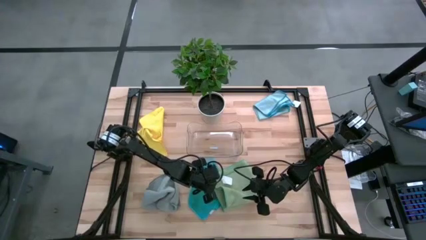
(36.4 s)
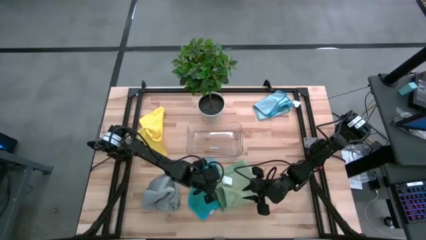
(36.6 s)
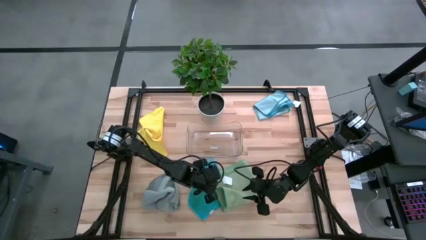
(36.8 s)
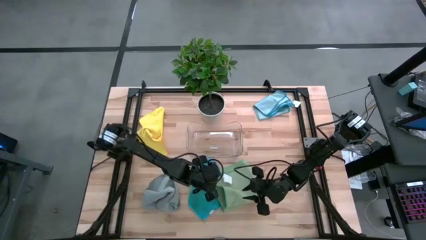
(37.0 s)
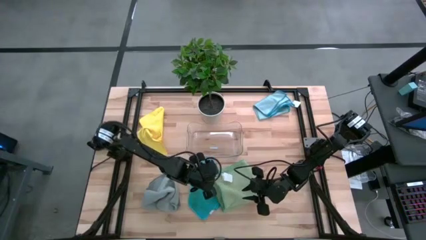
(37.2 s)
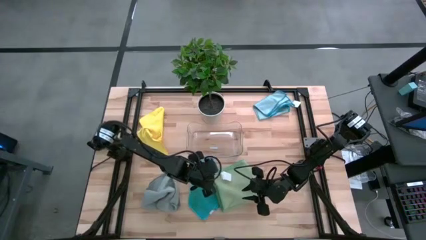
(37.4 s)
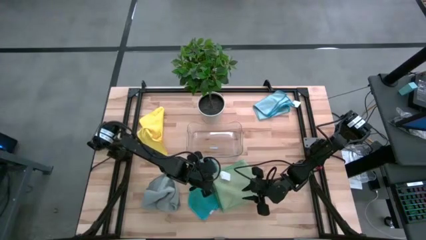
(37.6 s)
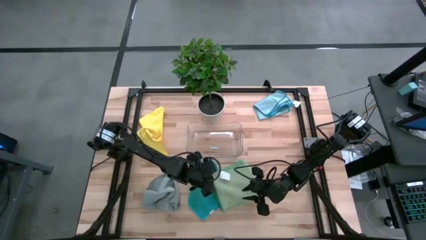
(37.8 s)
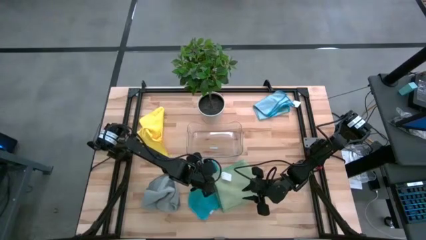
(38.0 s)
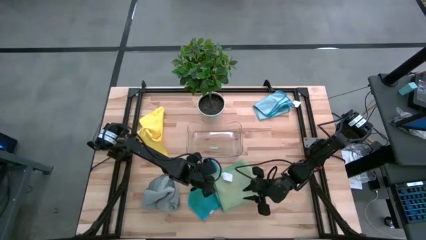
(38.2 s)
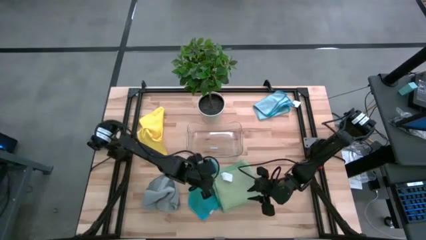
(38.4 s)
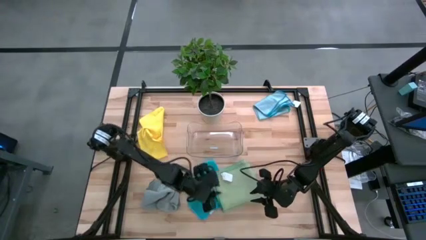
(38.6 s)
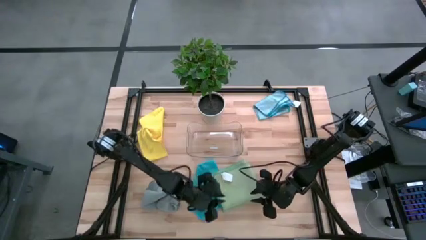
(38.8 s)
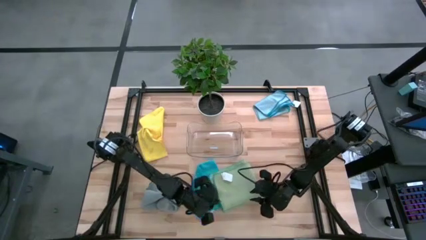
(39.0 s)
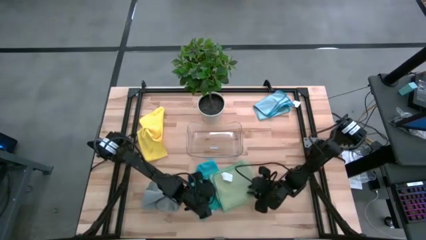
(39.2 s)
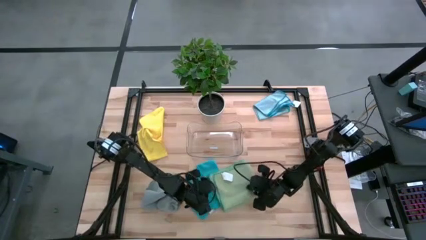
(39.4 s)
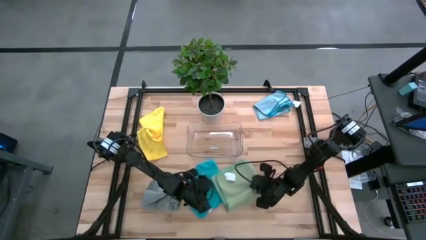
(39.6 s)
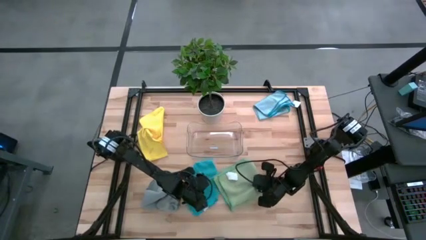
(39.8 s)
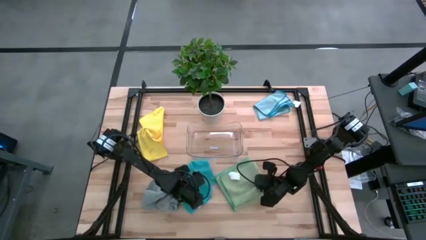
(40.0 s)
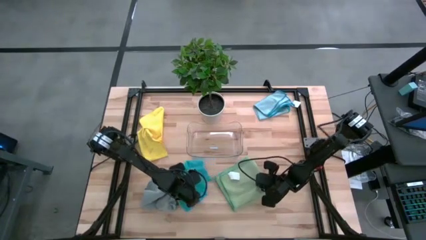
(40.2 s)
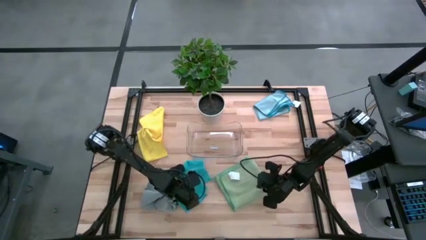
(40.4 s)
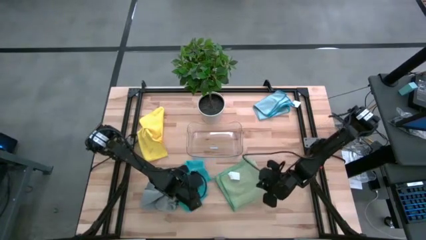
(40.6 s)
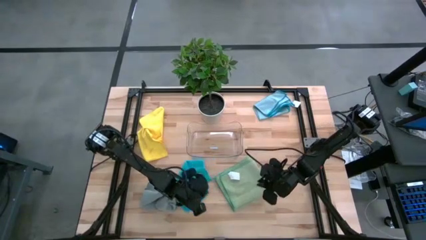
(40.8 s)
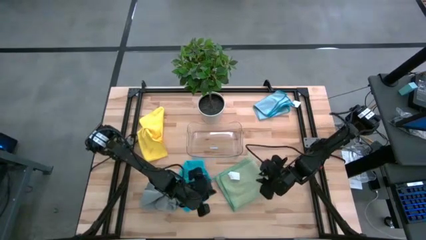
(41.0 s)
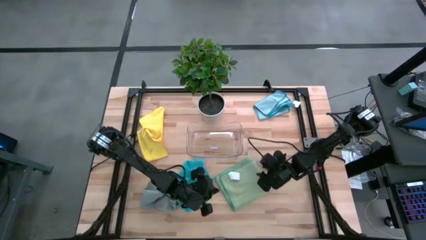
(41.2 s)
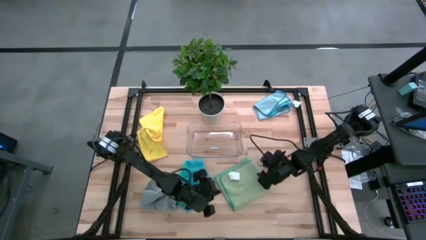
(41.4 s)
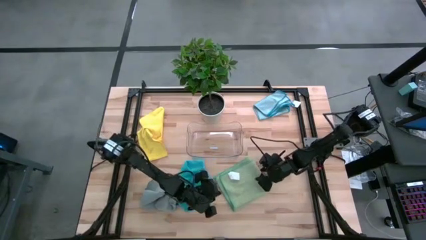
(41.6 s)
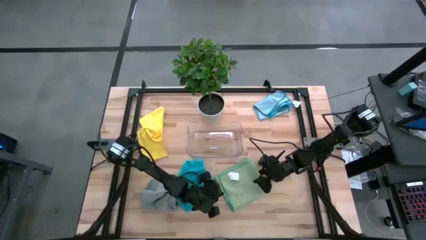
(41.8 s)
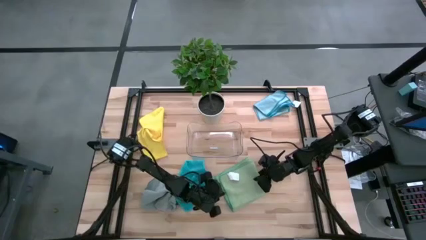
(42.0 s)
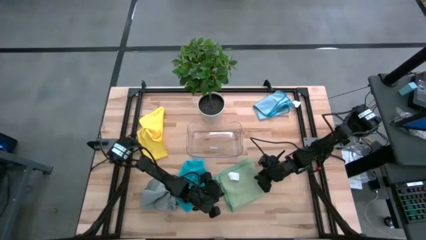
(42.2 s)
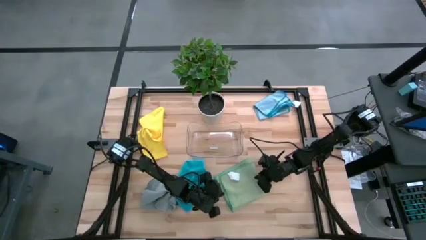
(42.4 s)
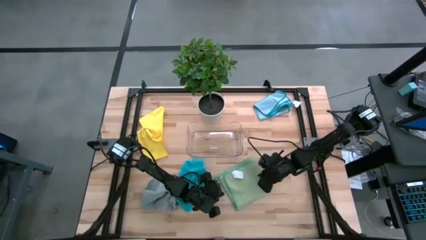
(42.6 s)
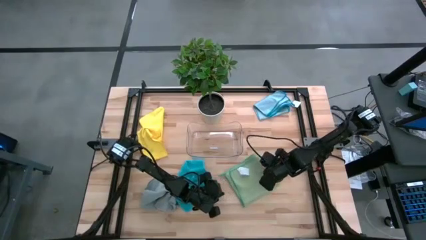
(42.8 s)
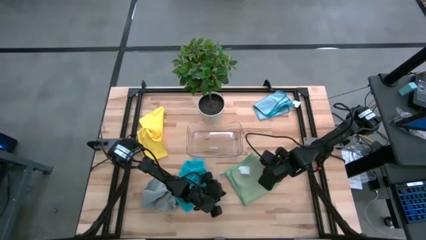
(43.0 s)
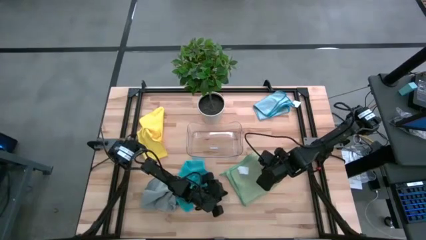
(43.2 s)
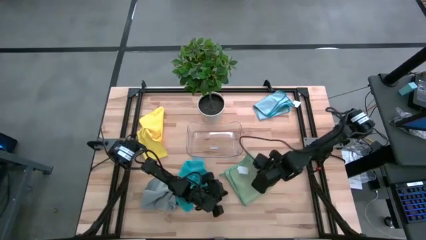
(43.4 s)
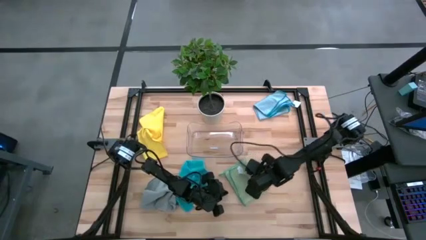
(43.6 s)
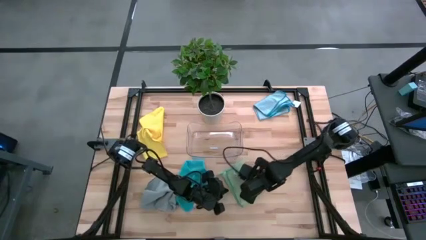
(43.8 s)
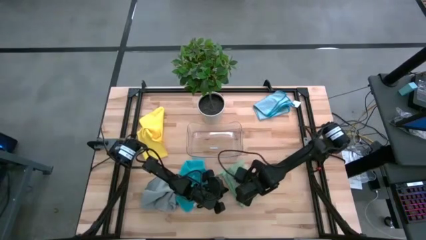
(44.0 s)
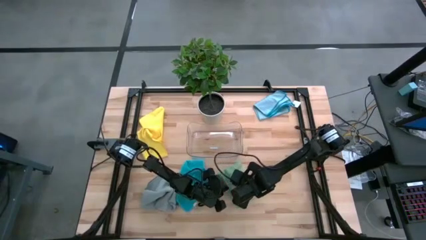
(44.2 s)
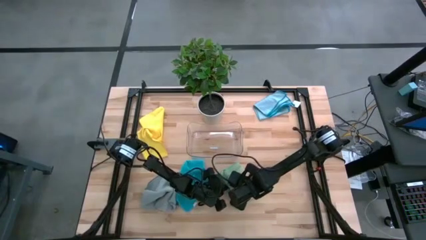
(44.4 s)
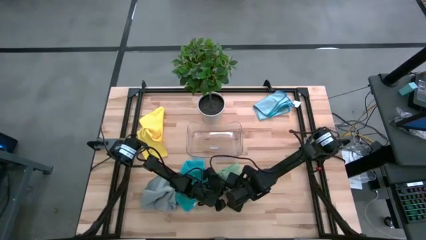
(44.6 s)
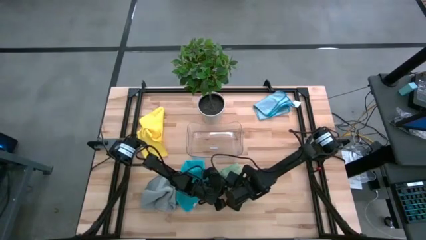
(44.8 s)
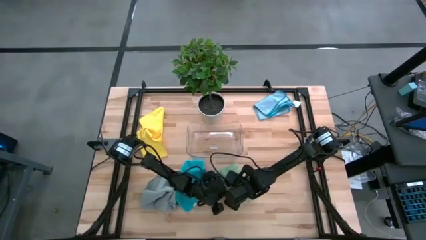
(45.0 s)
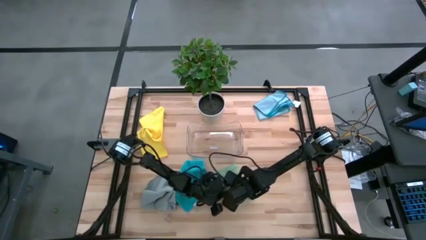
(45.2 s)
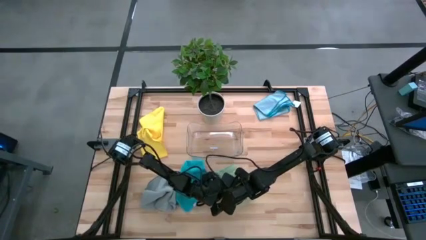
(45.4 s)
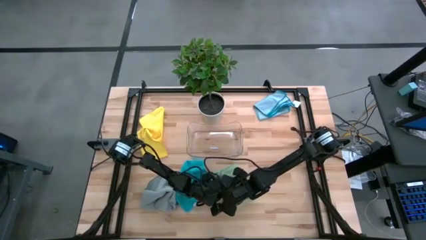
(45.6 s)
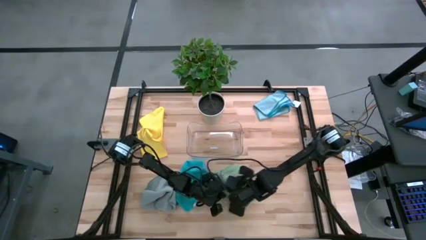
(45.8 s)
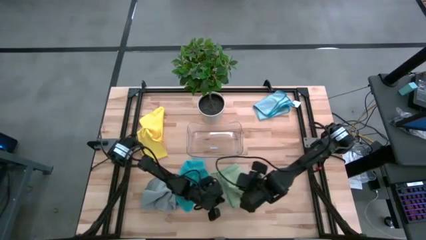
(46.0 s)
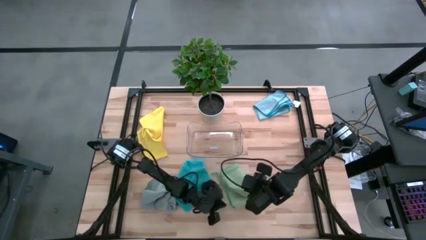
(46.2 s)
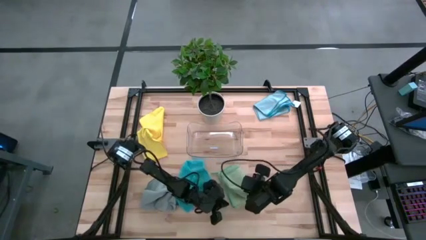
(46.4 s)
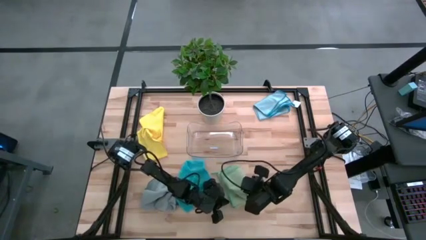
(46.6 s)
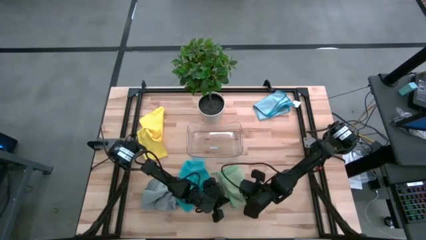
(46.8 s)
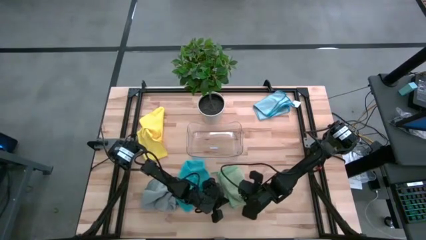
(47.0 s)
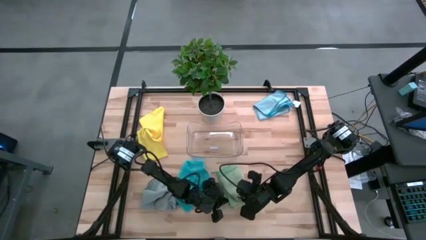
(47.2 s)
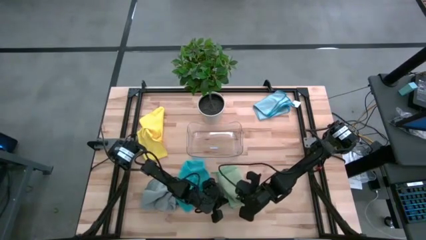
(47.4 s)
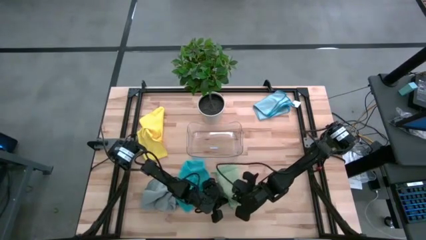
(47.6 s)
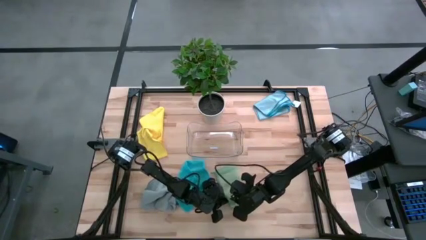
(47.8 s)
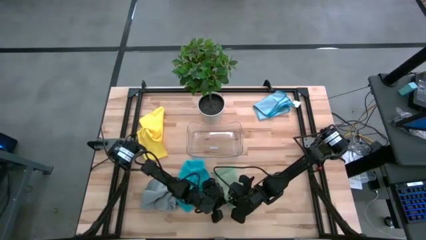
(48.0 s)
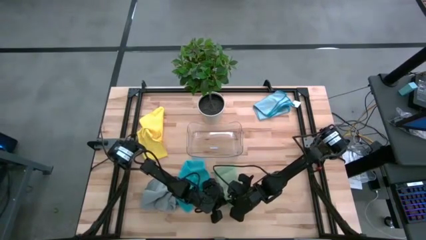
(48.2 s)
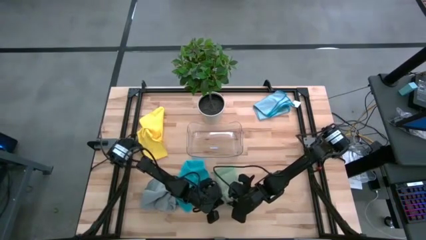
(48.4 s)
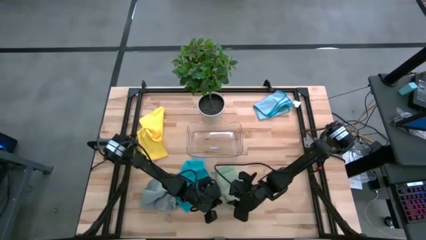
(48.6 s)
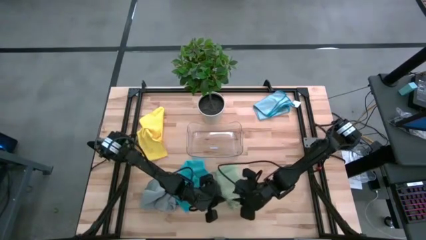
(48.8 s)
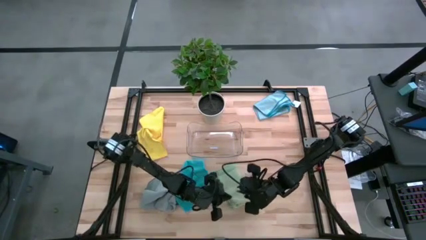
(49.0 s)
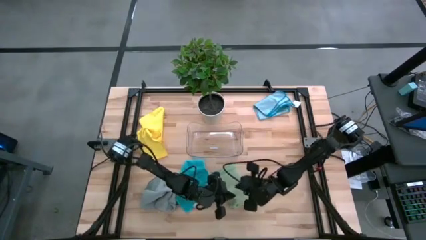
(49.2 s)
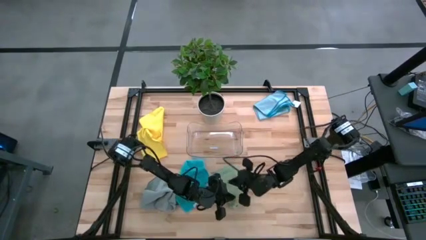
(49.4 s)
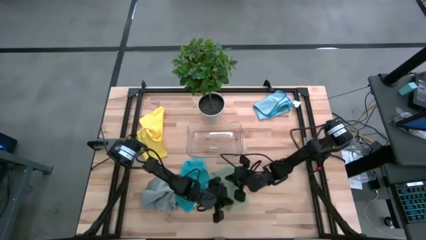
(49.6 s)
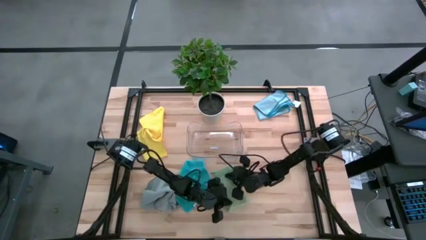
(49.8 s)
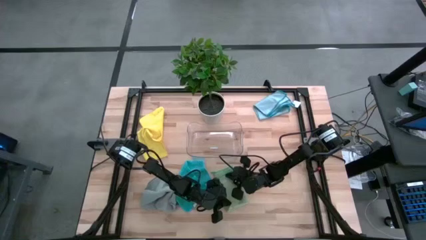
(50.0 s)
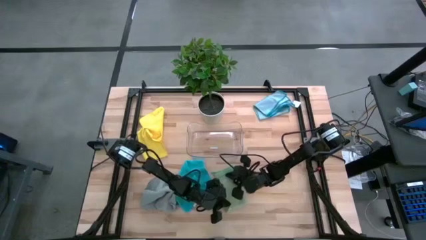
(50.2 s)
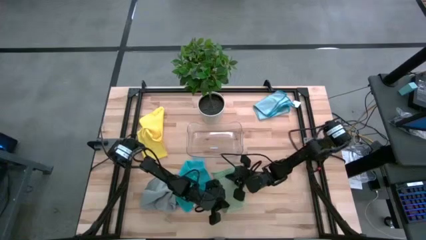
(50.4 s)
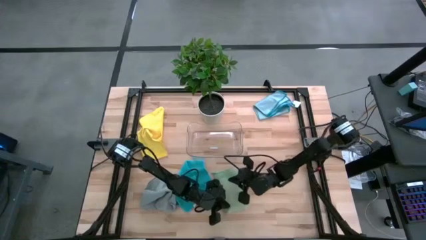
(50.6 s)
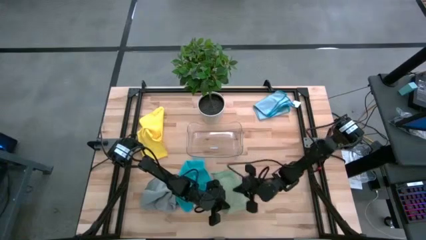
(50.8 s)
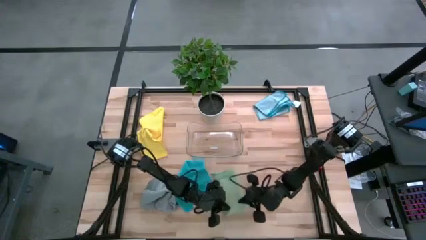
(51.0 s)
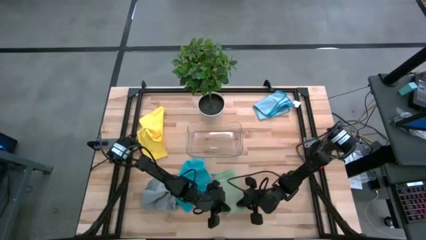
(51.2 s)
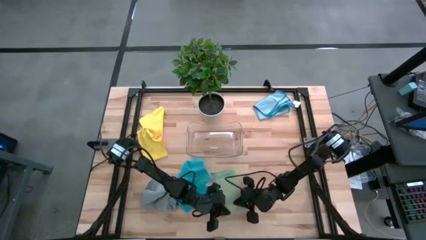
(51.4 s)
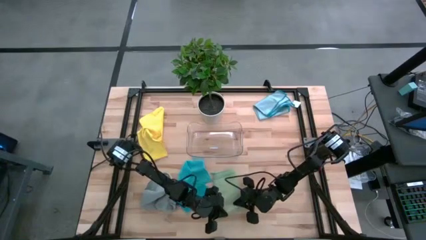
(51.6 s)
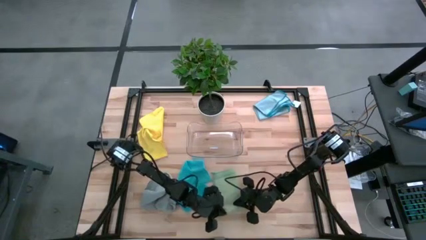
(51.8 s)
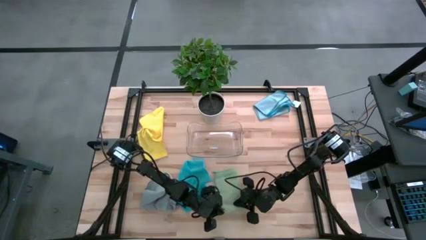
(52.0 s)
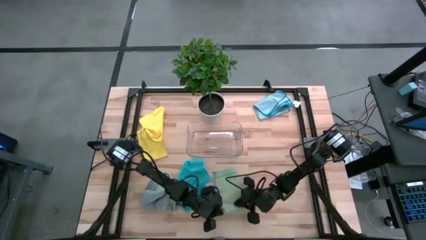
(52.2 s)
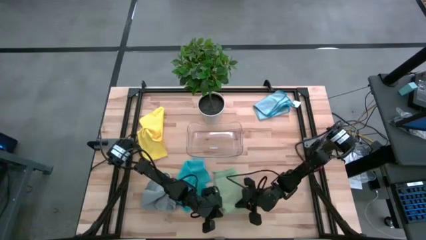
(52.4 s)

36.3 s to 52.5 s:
Task: Fold microfiber towels
Fold the green microfiber cloth
